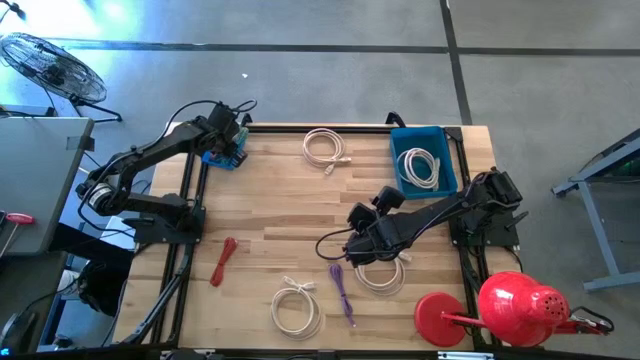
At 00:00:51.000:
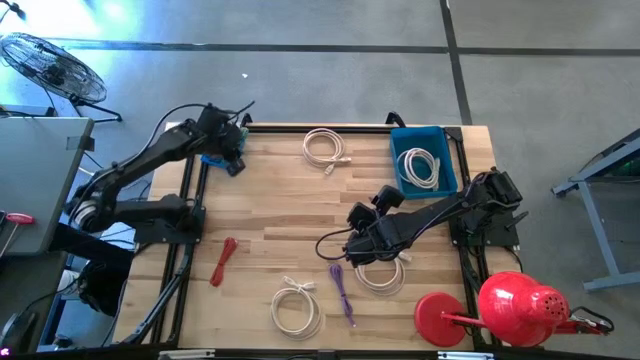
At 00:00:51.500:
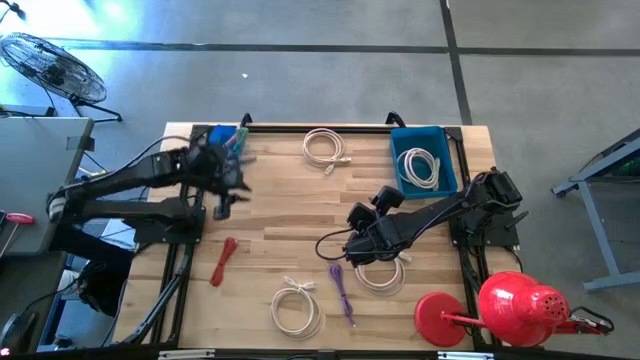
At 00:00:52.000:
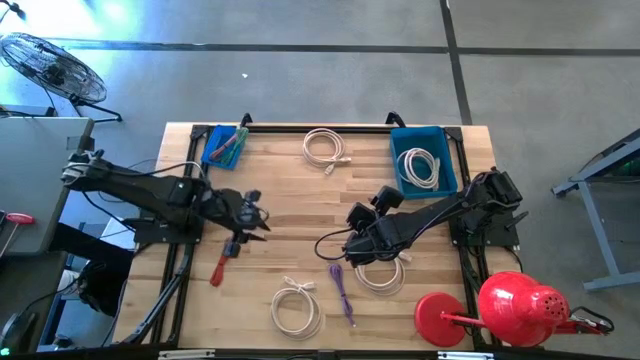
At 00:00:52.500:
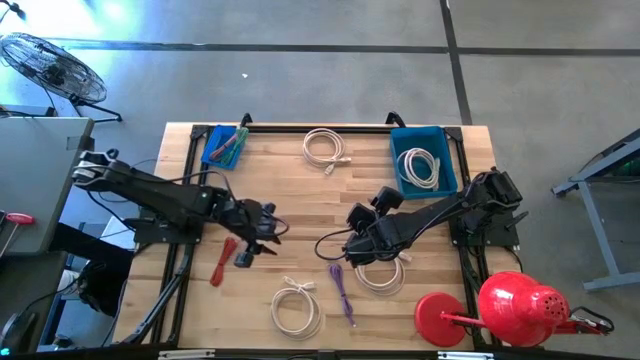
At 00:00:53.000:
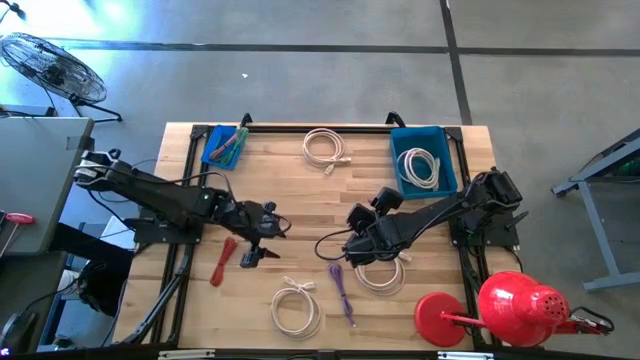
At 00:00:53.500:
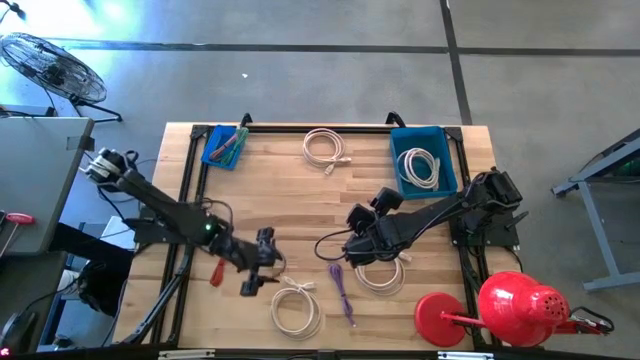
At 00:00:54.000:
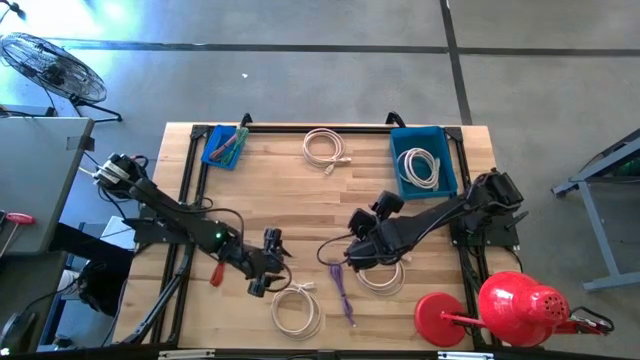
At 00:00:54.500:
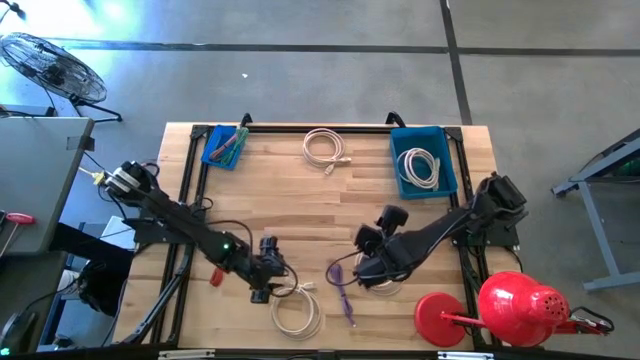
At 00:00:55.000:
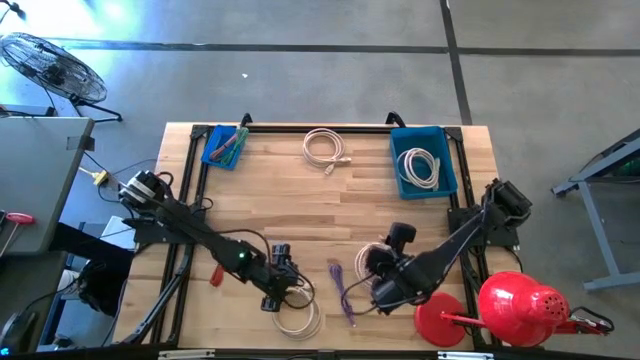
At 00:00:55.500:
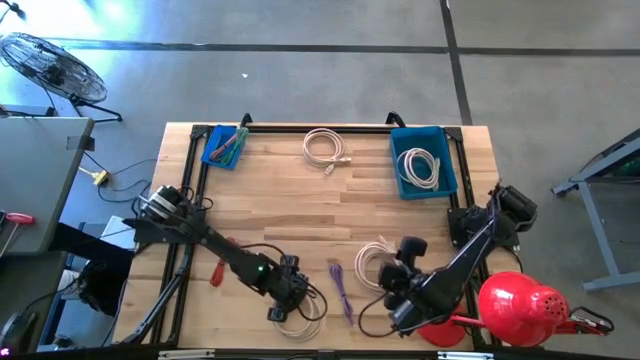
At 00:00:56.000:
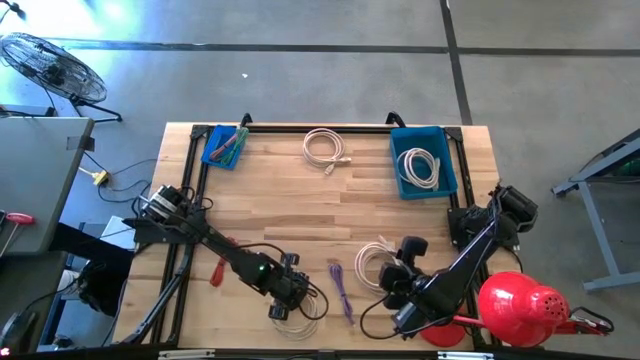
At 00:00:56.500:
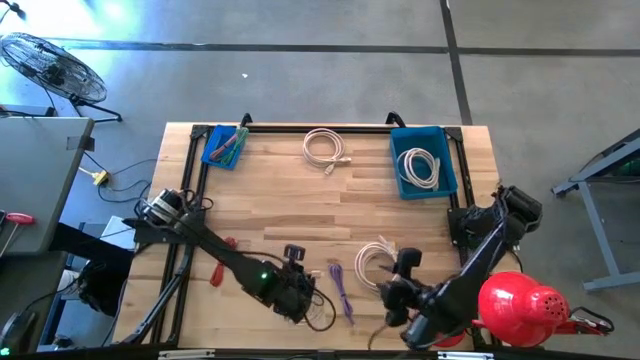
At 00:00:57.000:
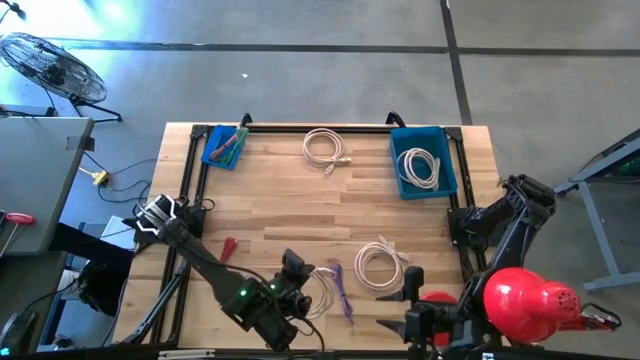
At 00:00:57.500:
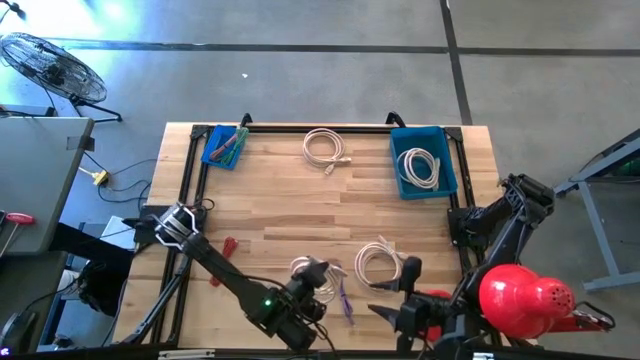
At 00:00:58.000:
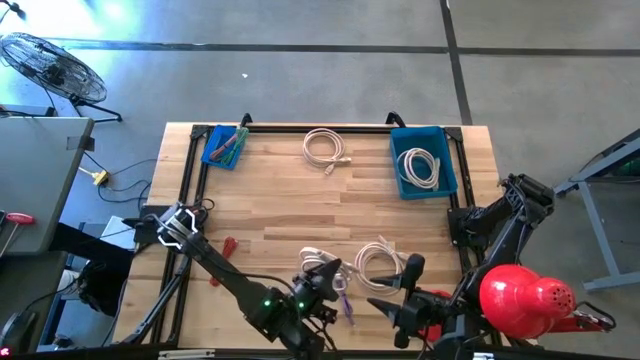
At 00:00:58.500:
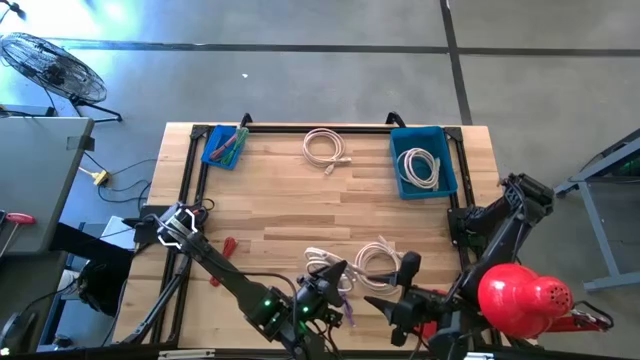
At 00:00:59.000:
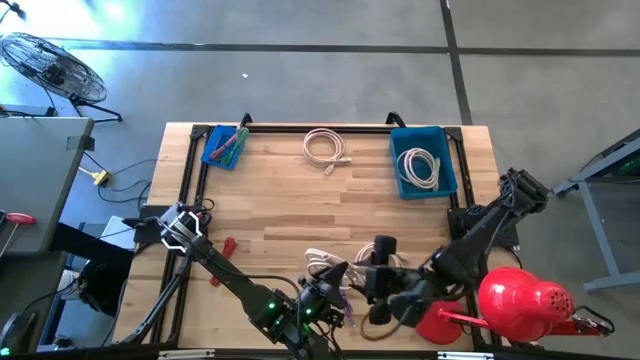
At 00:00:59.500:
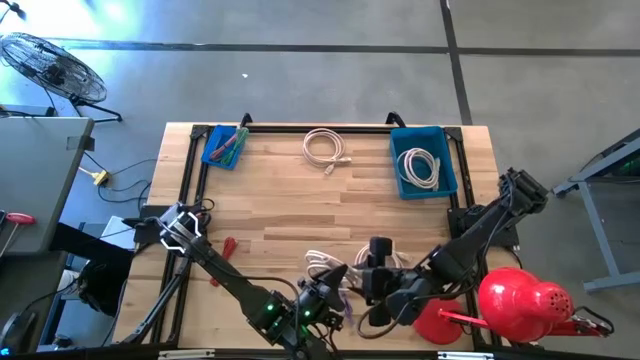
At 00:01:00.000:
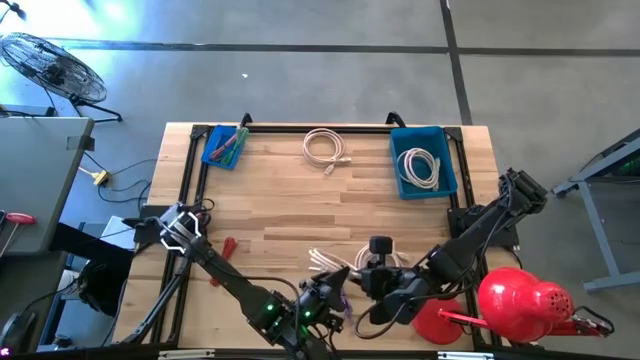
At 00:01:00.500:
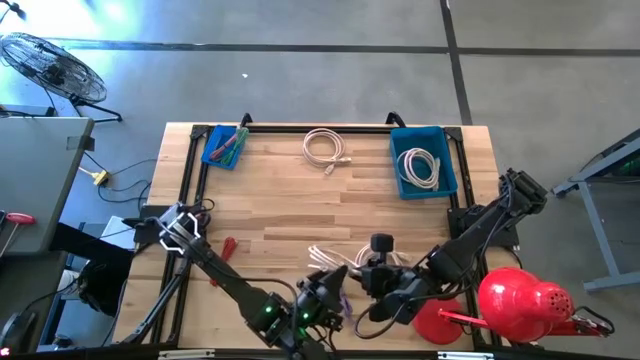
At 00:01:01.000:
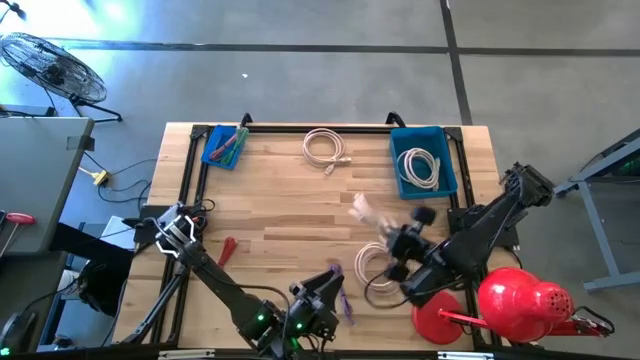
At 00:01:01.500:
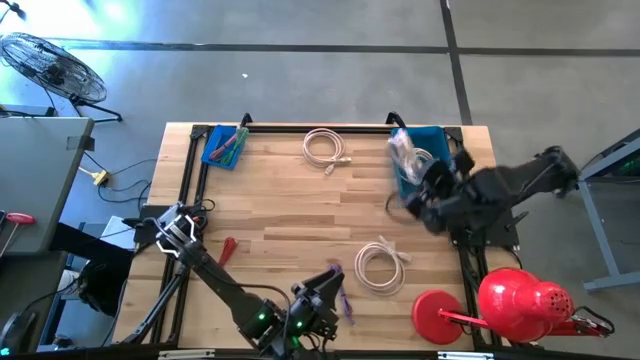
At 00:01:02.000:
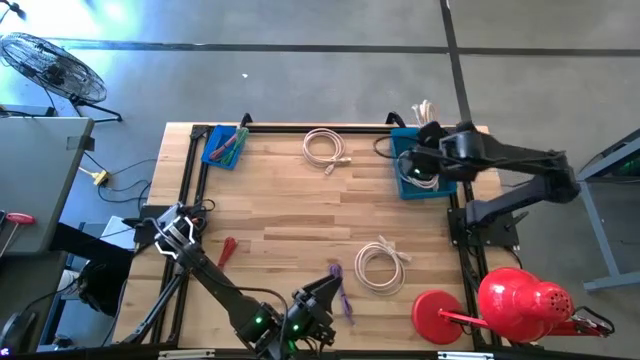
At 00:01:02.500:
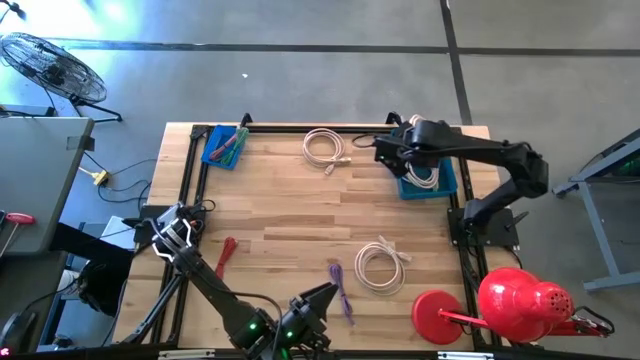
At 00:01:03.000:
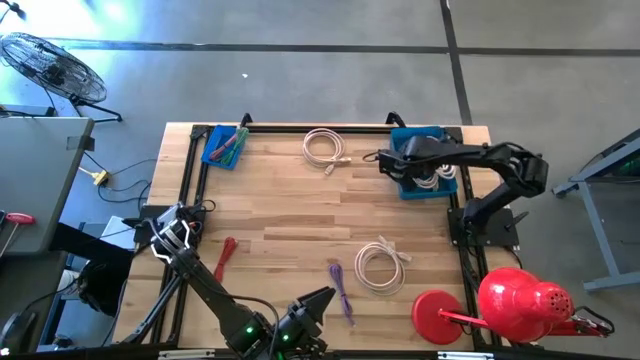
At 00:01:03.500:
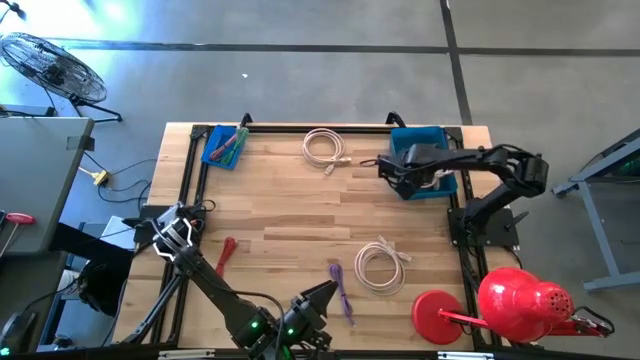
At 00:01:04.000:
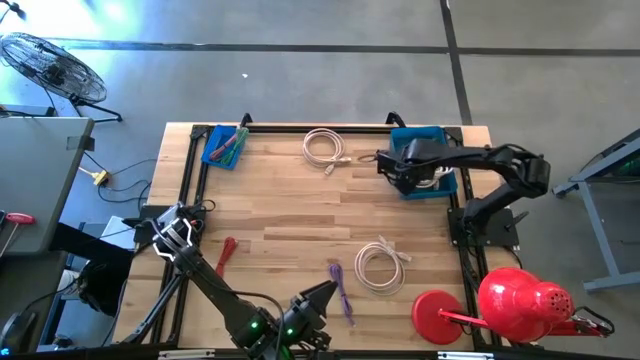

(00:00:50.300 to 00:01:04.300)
Task: Pick & Place USB Port
Put the brown HDMI cable into the right blue bin

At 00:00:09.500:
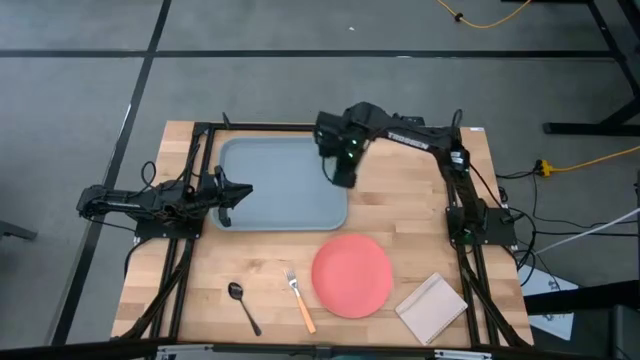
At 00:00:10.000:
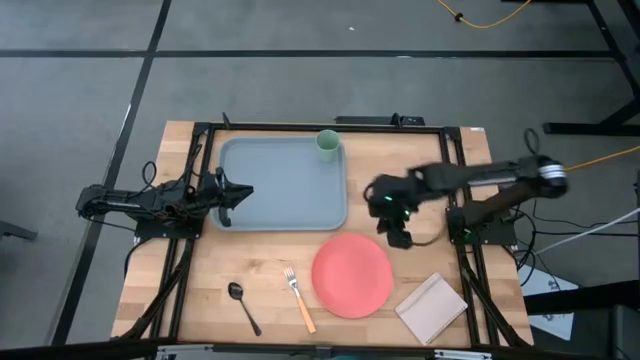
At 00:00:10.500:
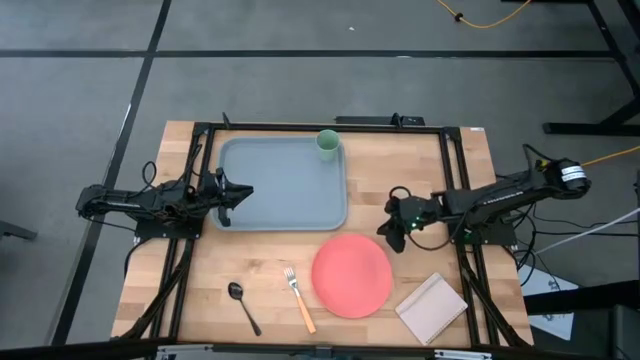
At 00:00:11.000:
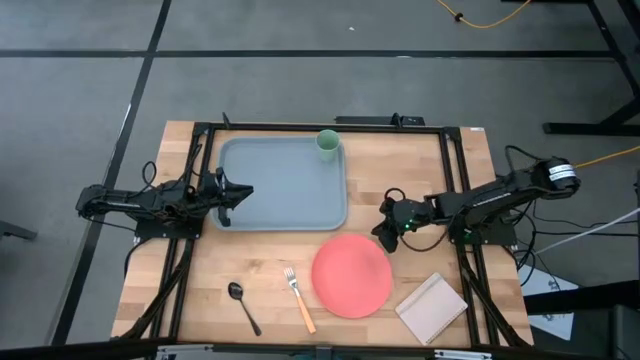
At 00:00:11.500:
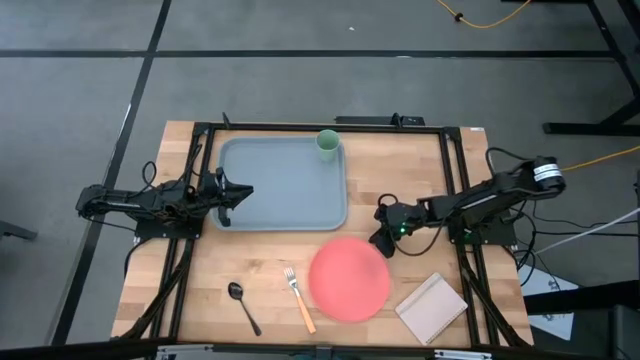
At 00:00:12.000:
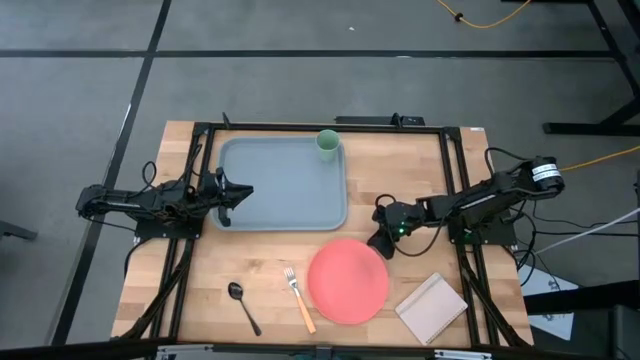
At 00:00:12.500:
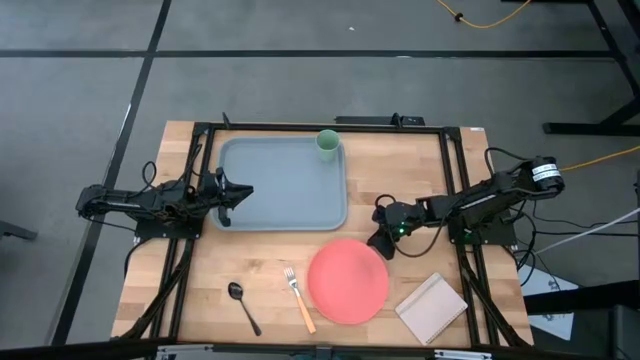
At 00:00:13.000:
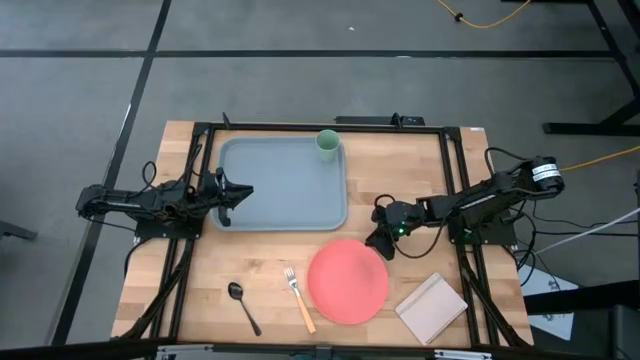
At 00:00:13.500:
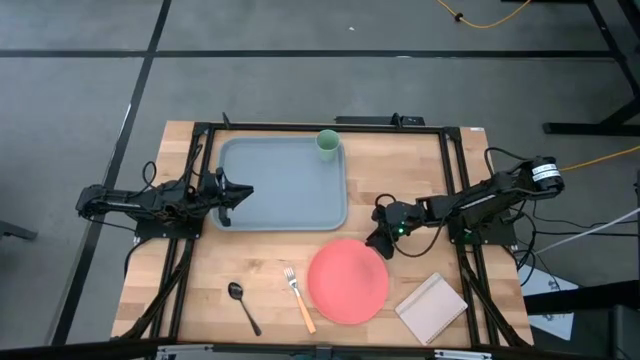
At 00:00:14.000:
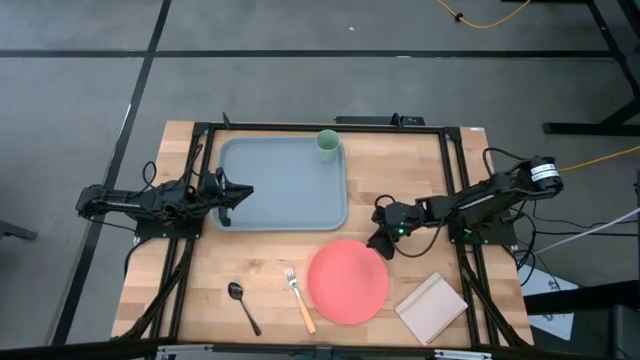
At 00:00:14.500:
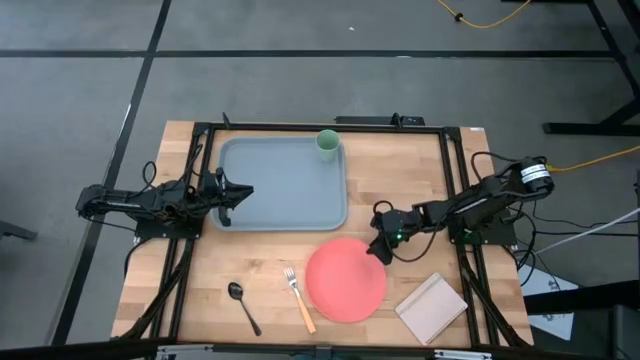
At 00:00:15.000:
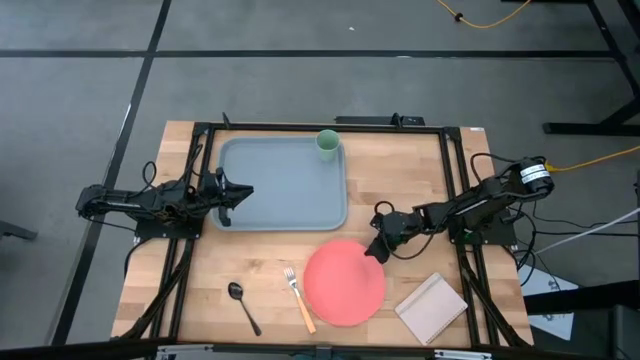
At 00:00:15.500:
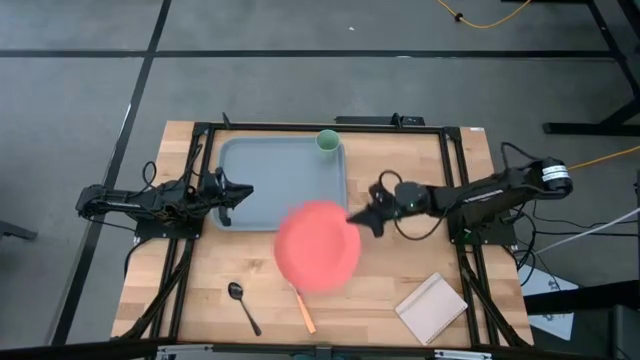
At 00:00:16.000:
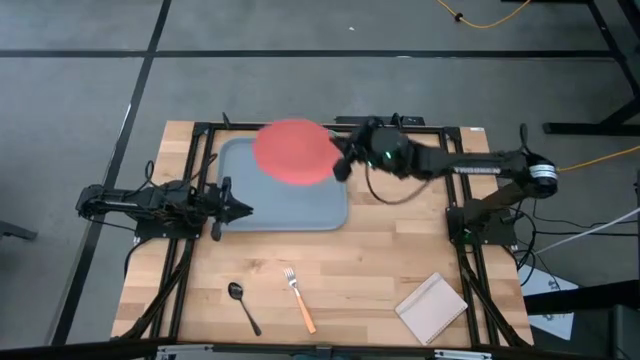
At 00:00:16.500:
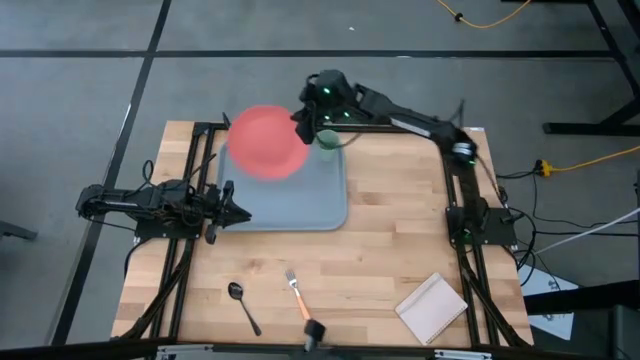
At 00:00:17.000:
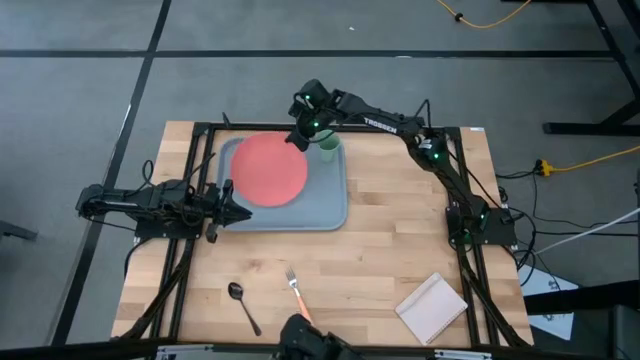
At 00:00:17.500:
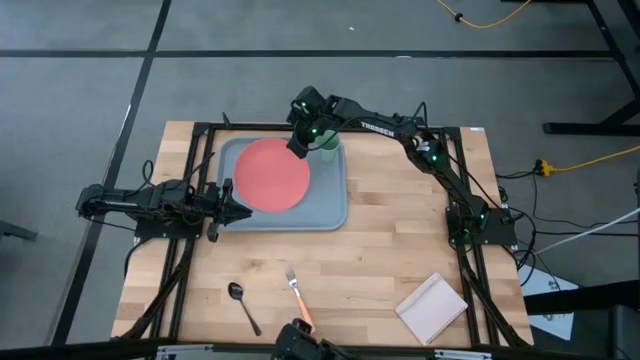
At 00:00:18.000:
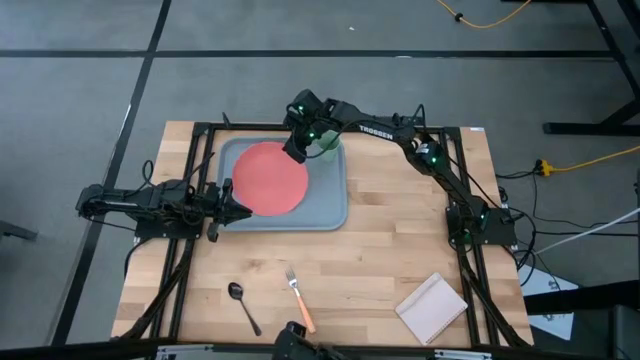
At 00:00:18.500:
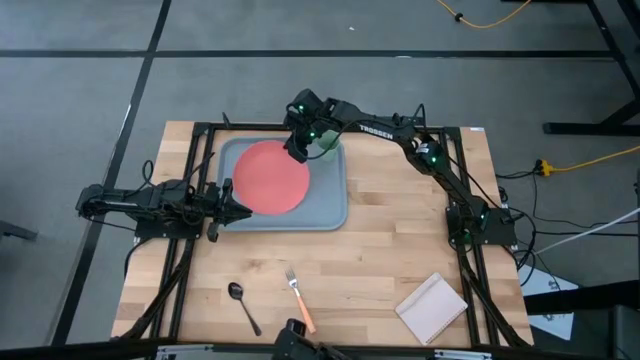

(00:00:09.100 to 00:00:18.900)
Task: Pick and place plate/cup/fork/spoon on tray
Put the light pink plate on the gray tray to the bottom left of the green cup
